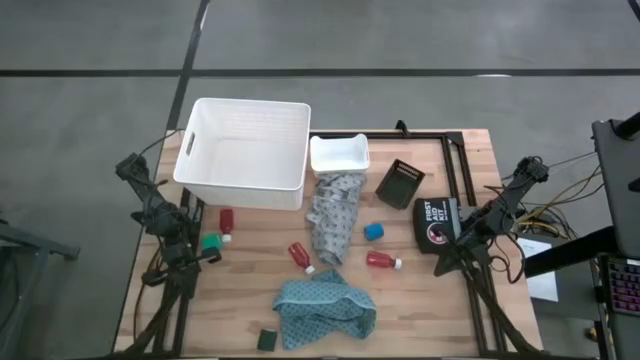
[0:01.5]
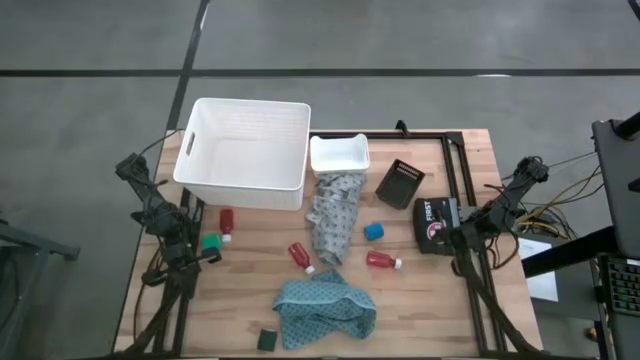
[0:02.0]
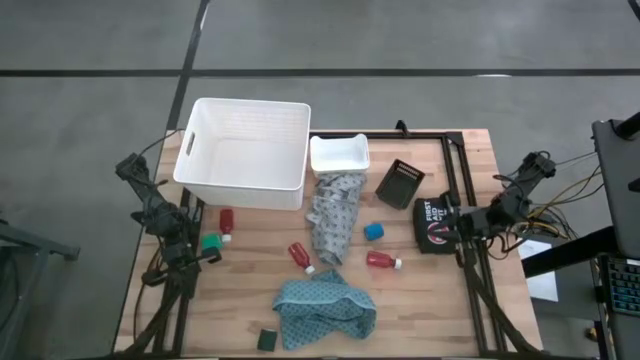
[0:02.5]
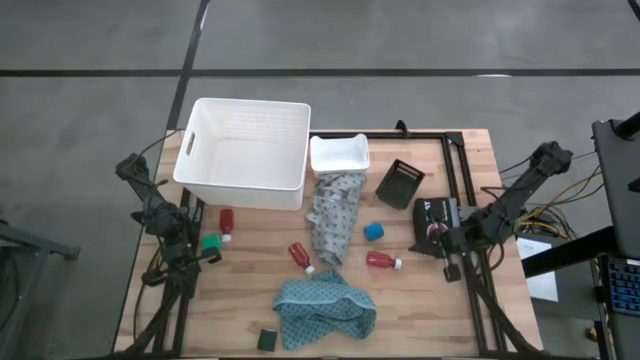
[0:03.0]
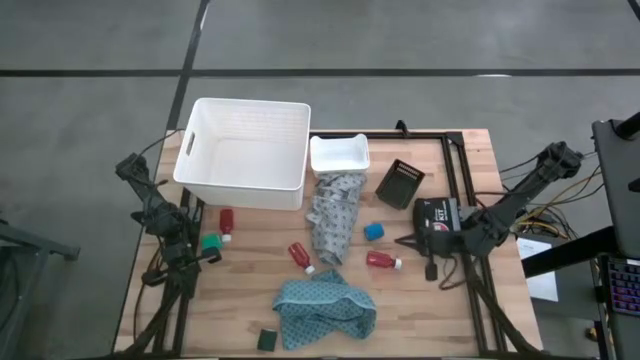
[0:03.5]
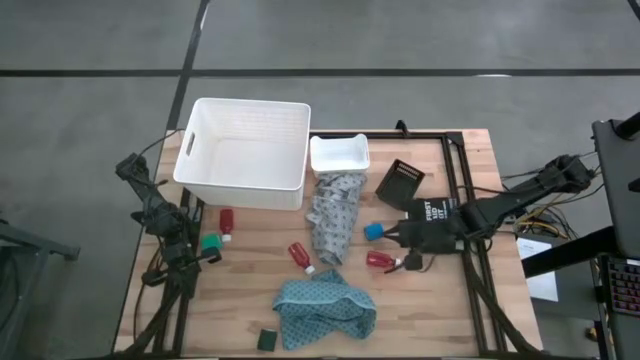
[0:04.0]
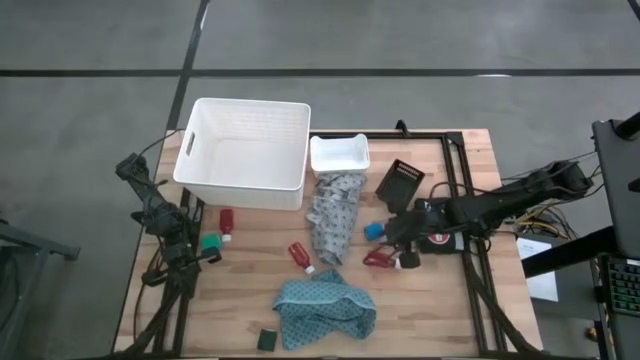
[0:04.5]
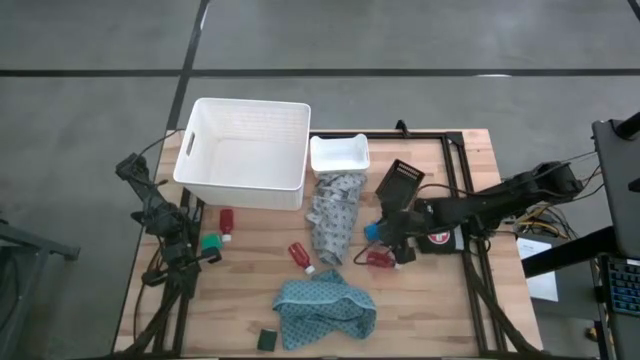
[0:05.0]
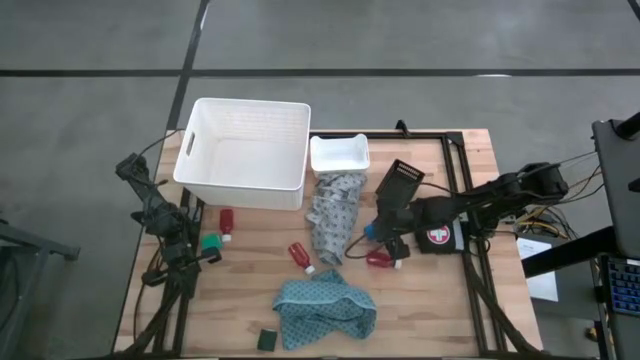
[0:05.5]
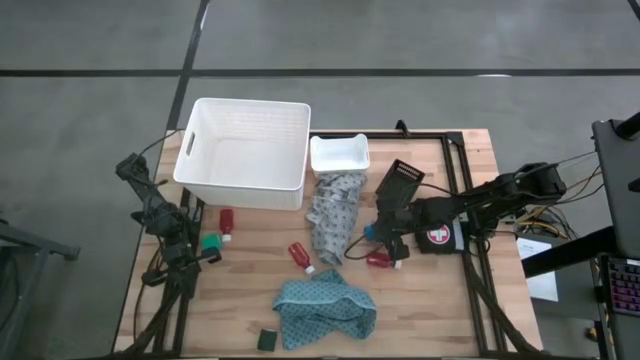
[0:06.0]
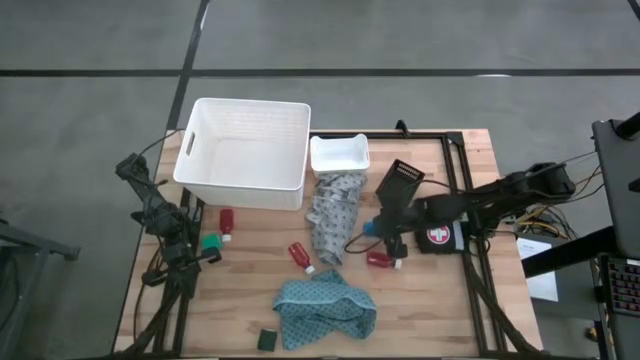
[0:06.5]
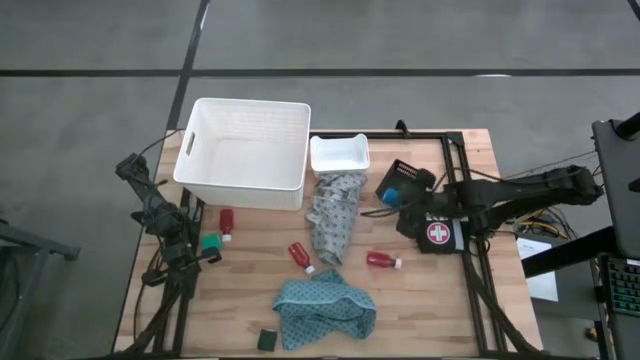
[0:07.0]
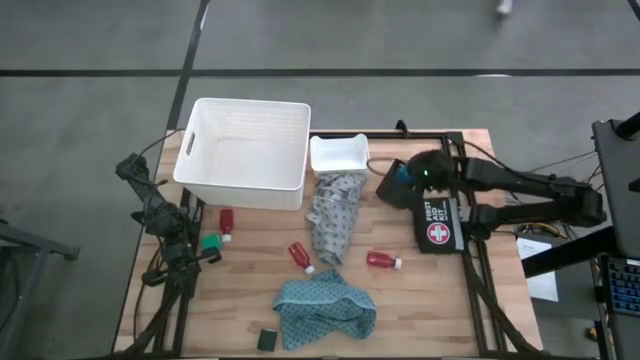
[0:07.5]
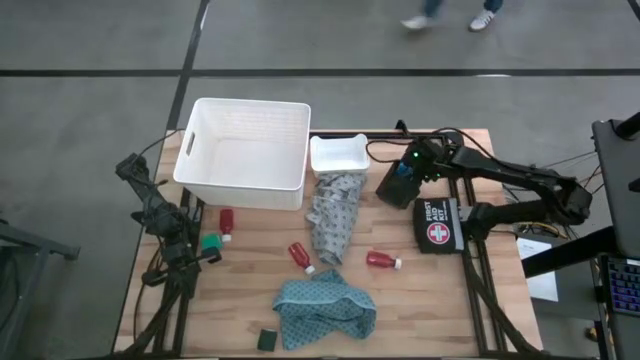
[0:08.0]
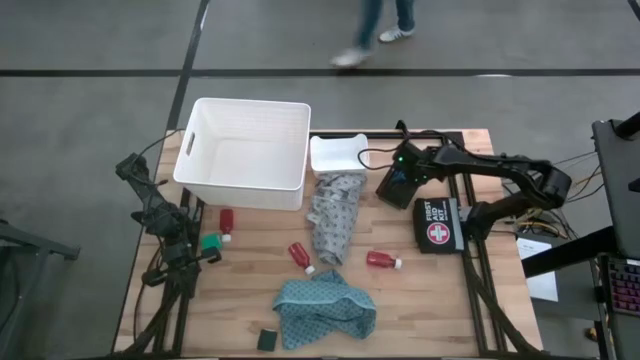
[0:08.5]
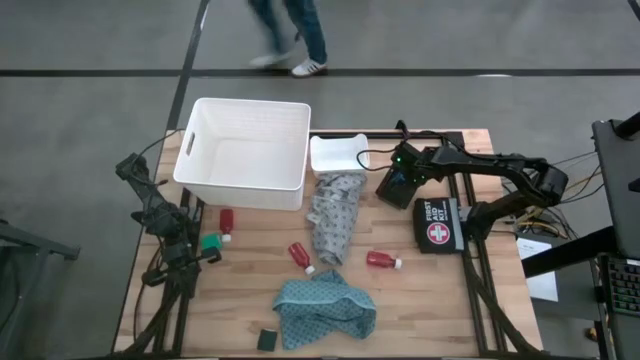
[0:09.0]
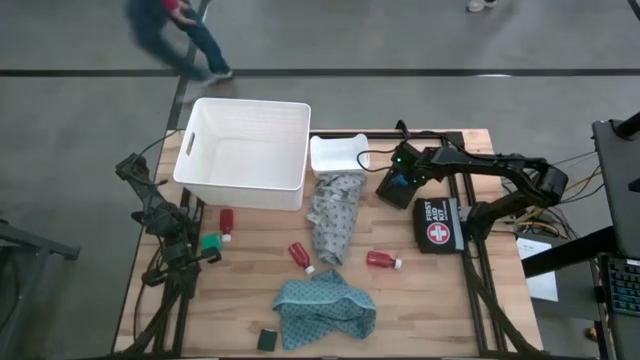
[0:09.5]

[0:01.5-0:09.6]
Task: Pick & Place Medicine items
Put the blue bandage into the black bin

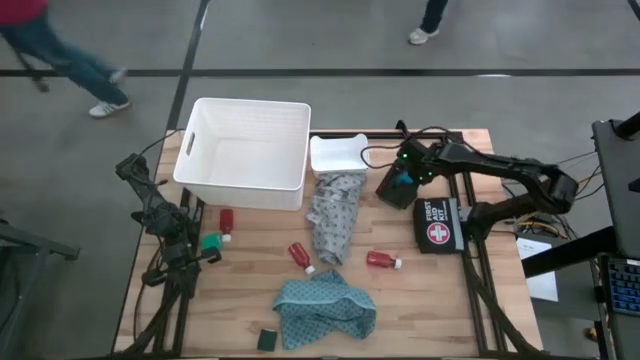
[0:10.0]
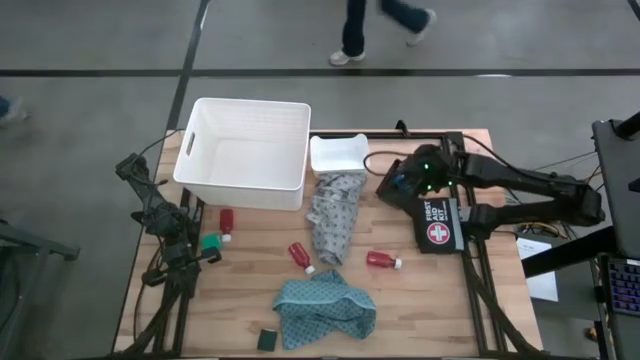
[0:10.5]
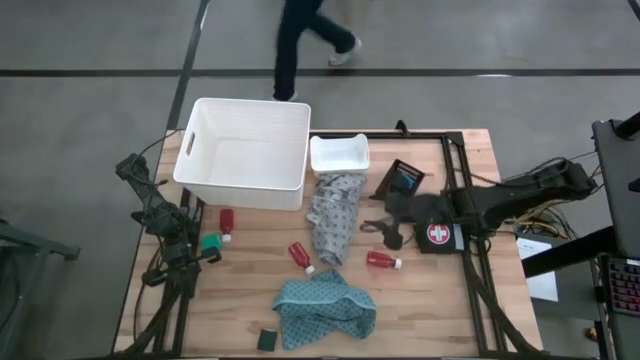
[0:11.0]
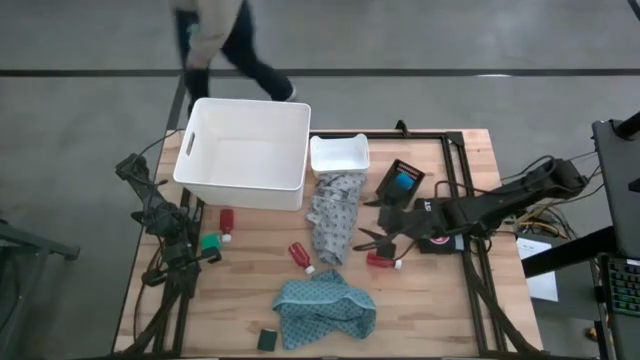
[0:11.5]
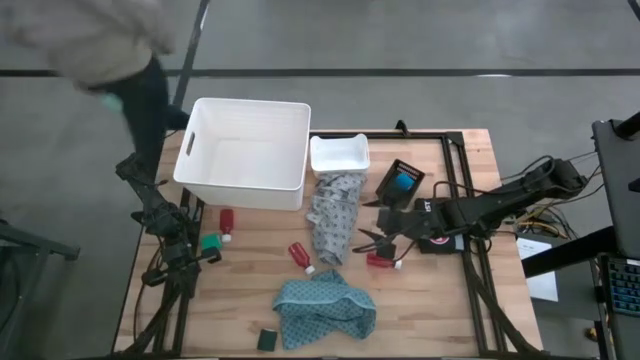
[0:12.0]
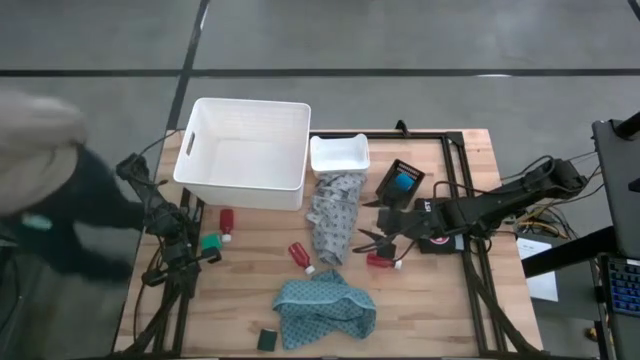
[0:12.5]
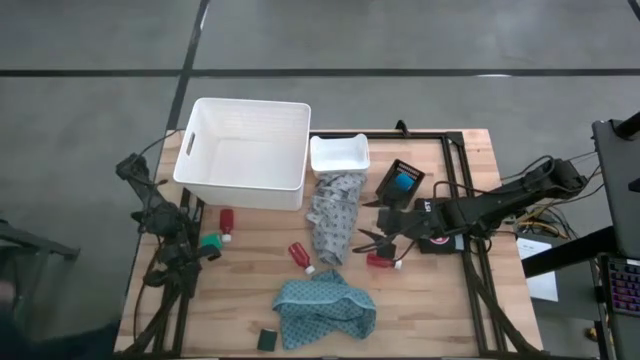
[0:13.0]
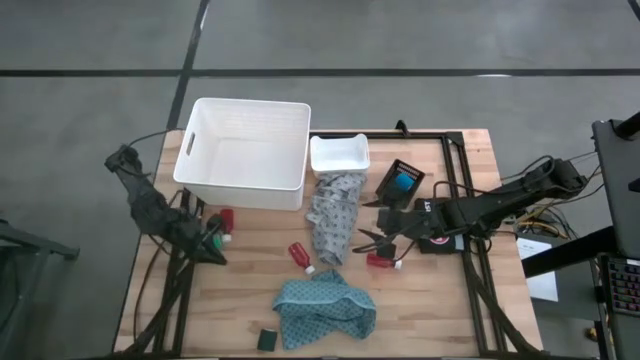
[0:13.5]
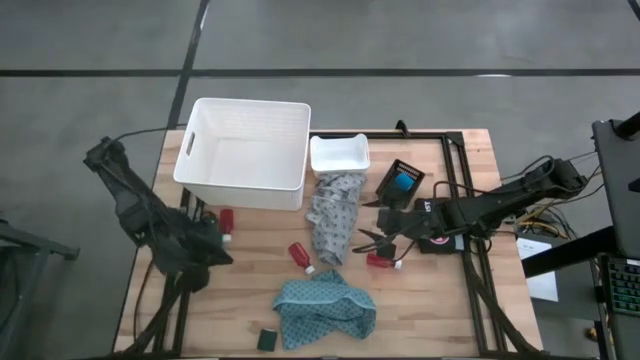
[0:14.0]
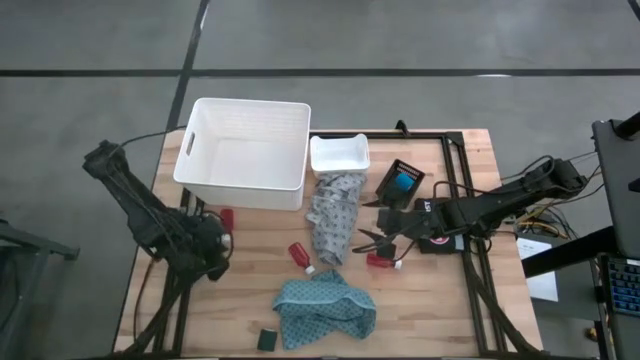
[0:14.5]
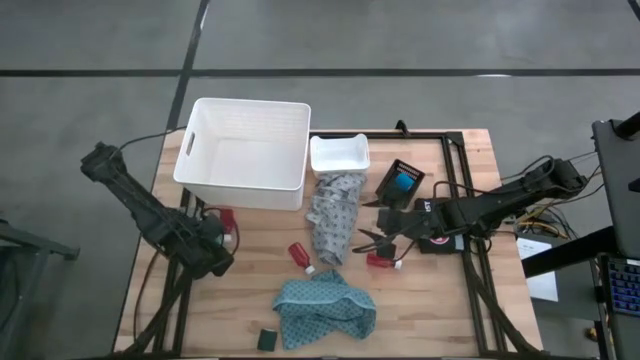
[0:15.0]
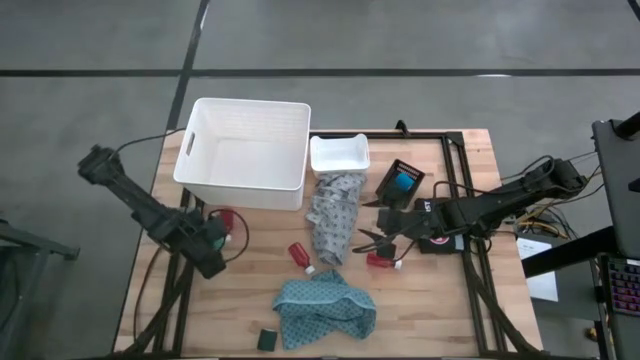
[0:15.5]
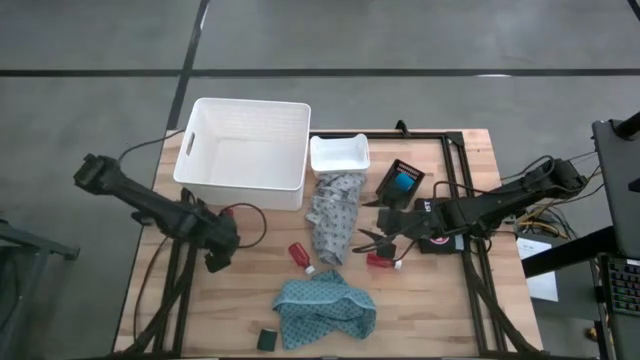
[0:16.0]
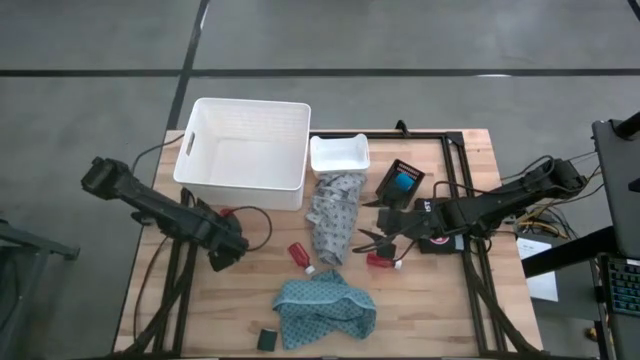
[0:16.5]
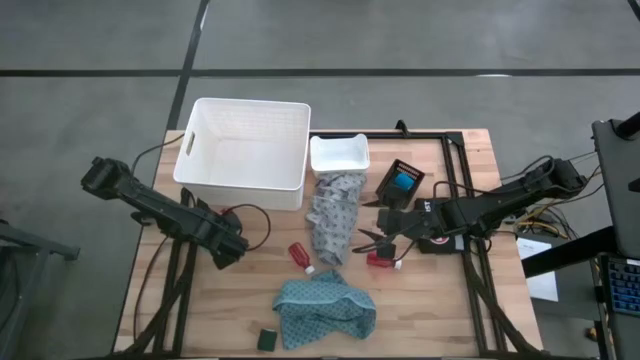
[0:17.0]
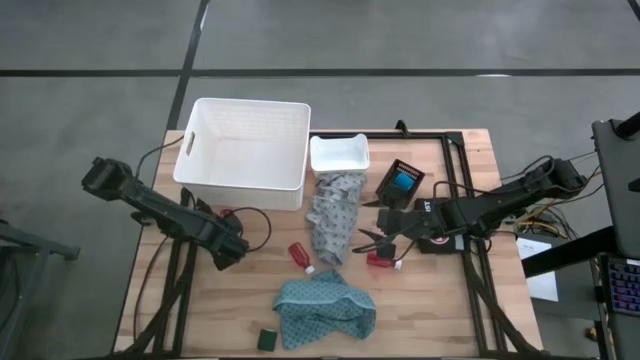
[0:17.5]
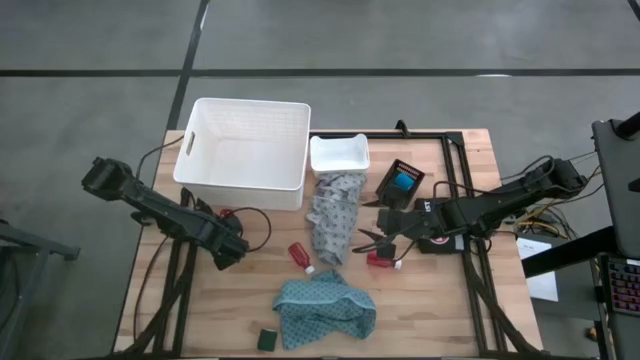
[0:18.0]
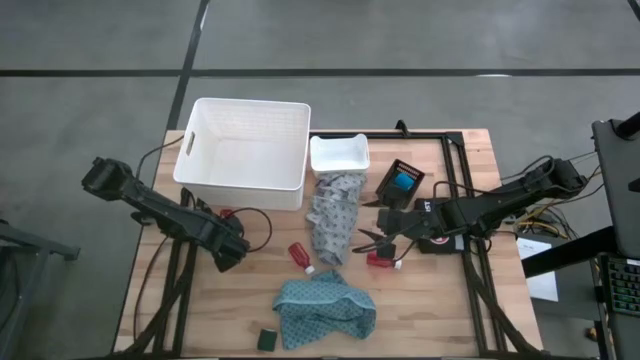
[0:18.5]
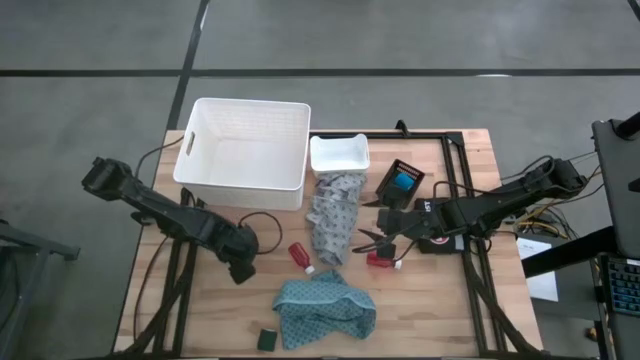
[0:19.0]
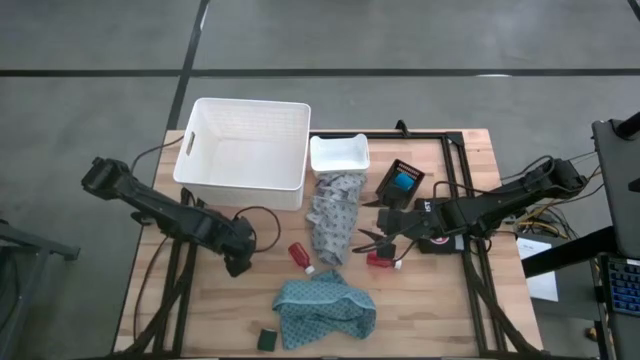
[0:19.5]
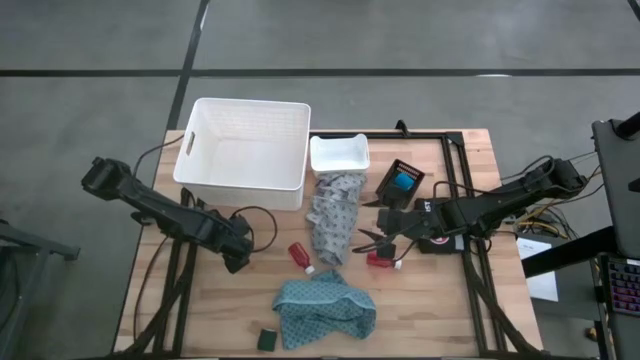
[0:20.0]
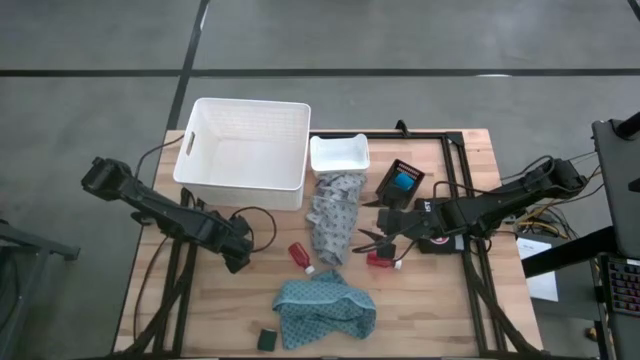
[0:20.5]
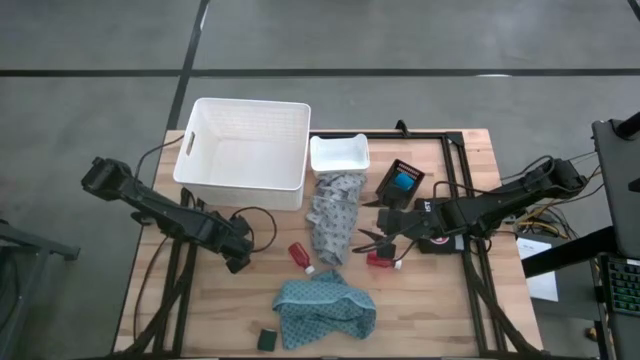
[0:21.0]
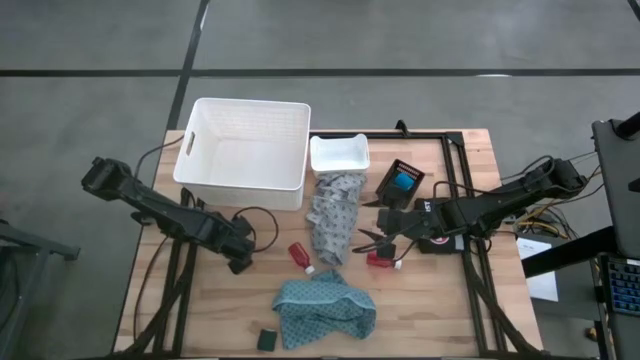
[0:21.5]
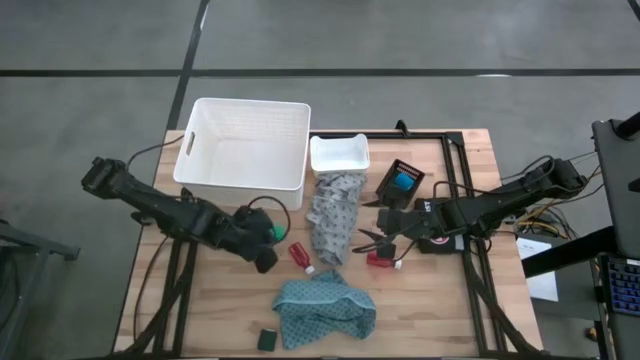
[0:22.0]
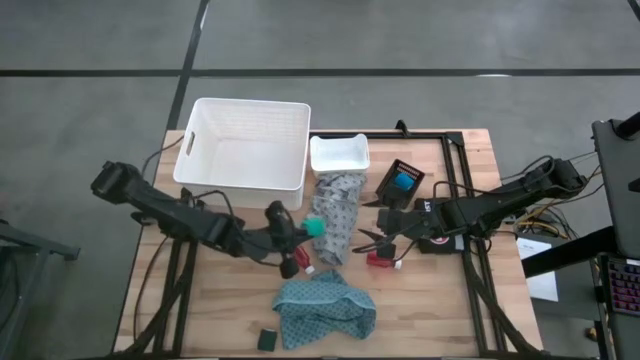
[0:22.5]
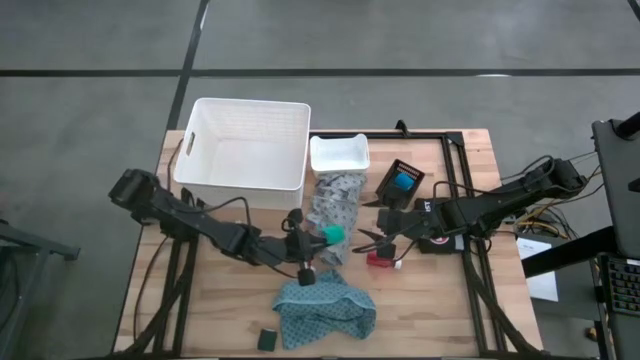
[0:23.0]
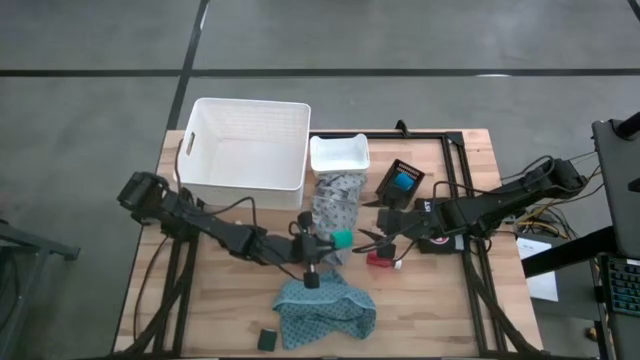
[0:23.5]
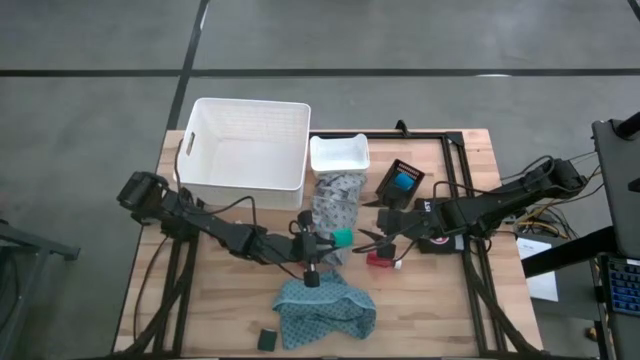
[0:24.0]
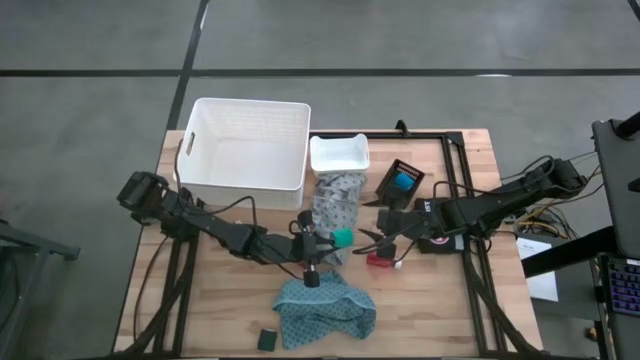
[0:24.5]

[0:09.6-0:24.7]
Put the light blue bandage into the black bin
